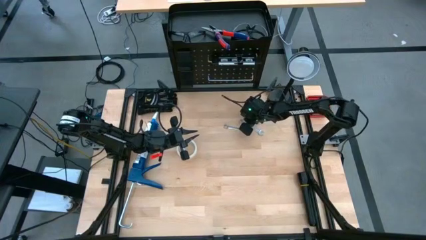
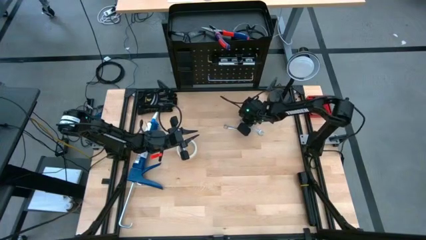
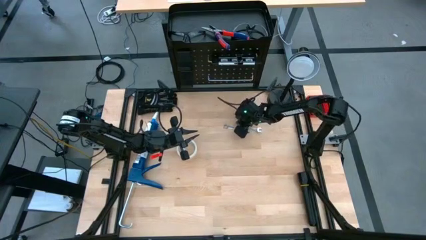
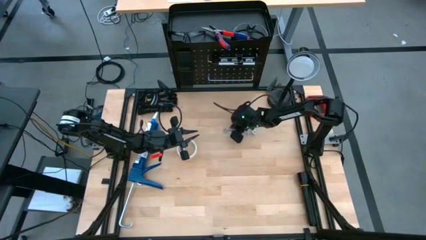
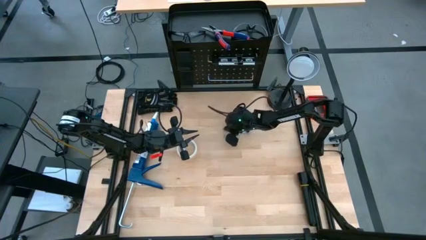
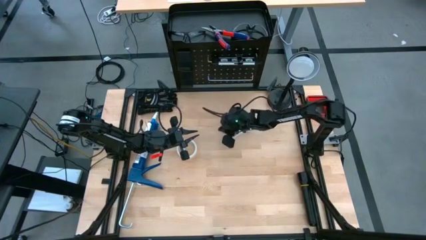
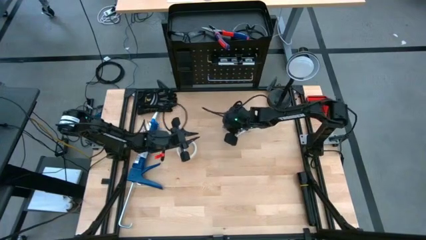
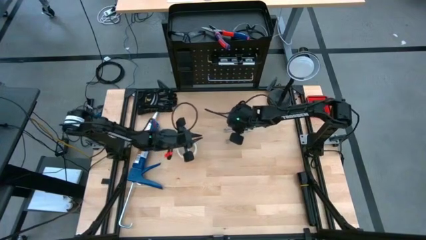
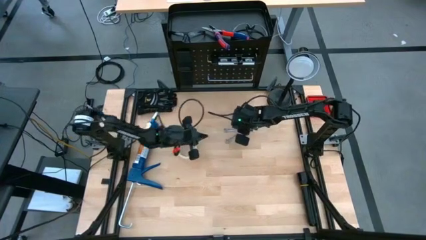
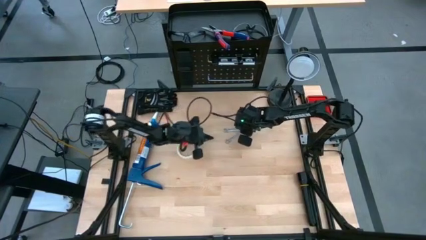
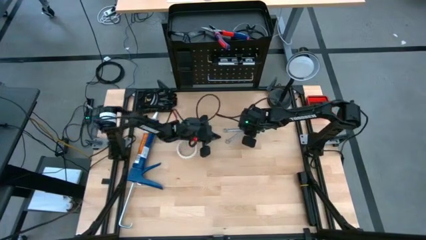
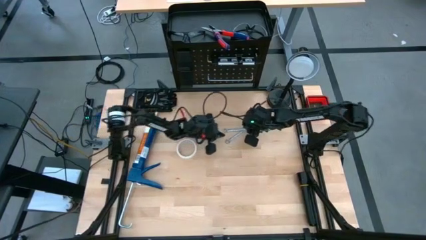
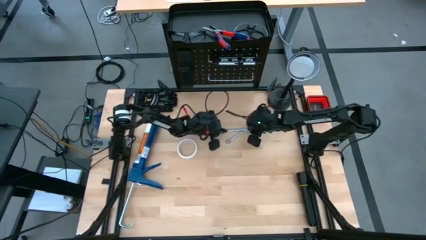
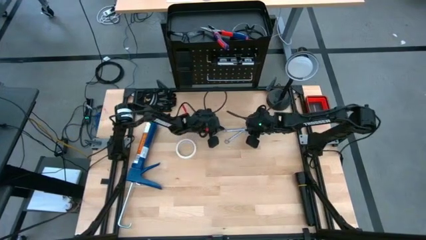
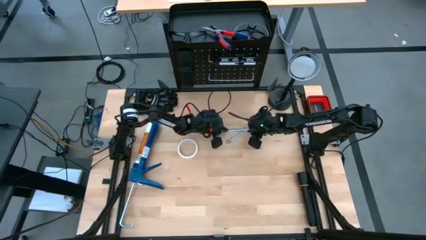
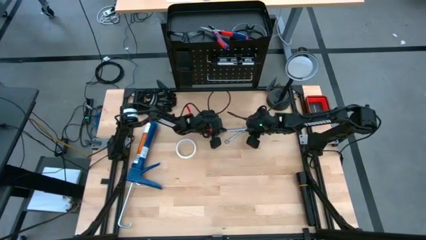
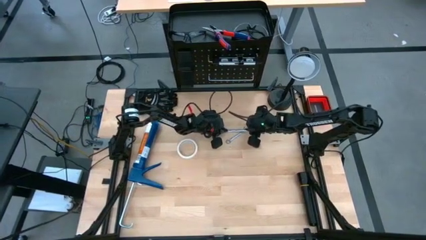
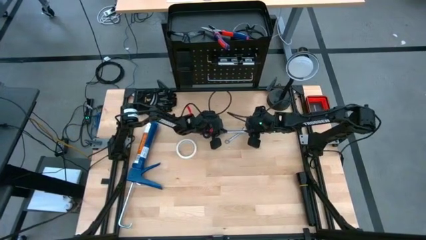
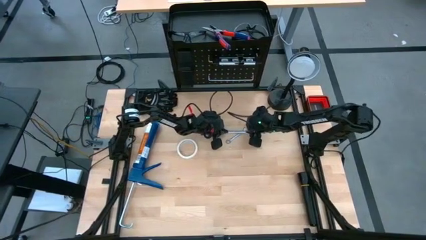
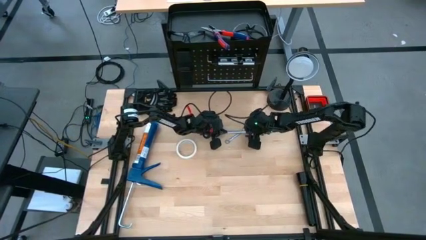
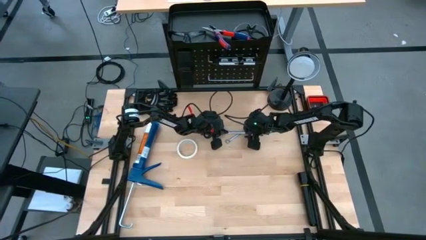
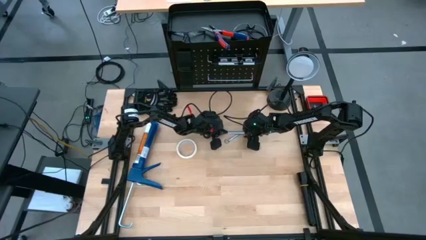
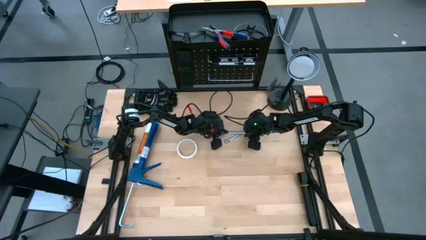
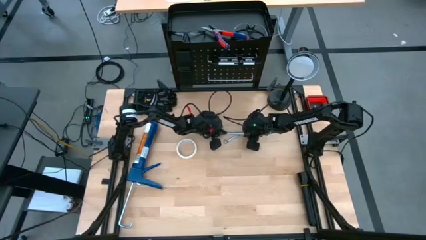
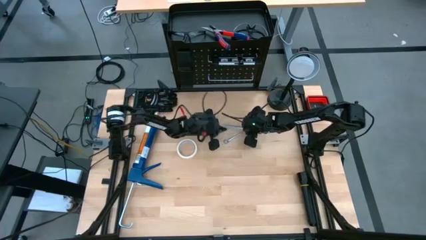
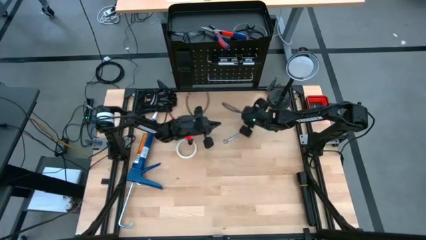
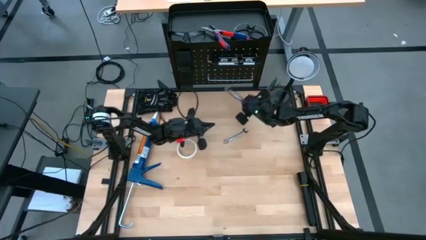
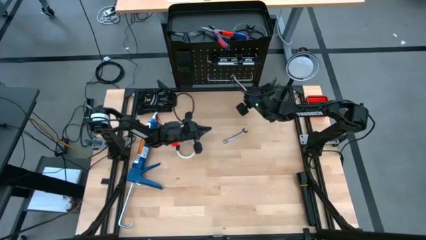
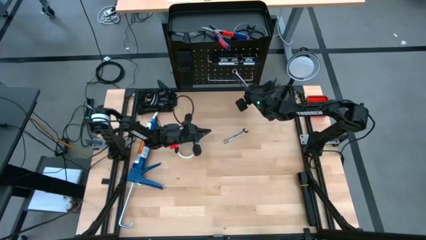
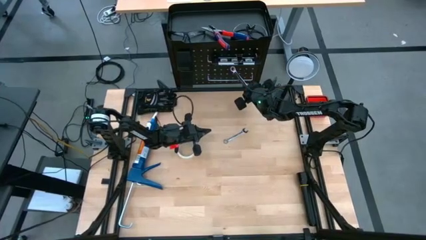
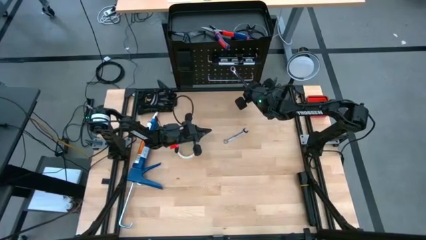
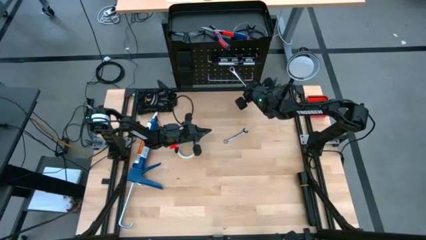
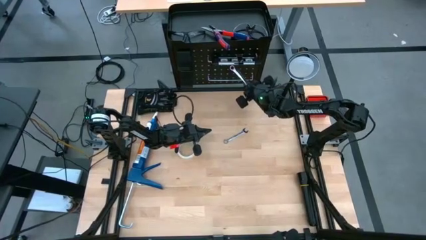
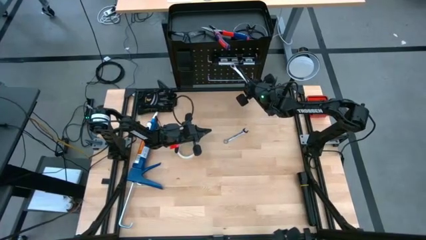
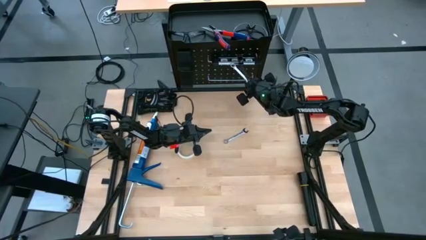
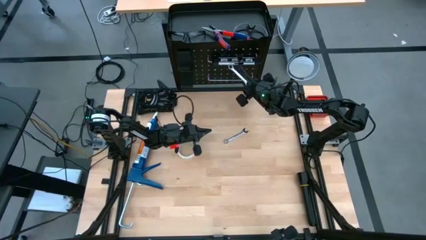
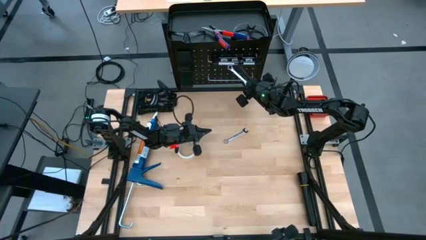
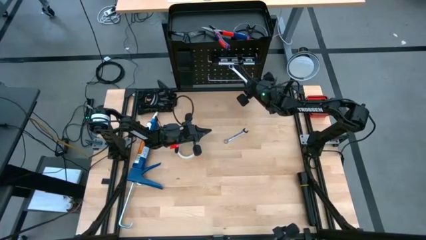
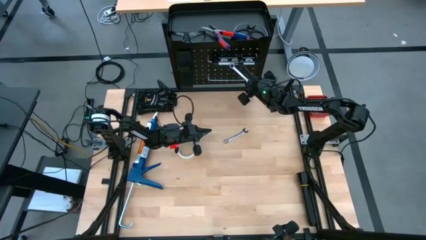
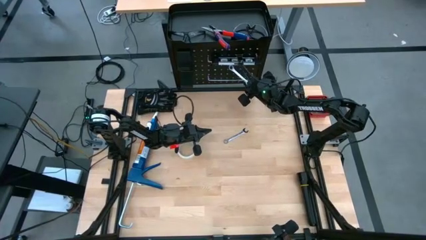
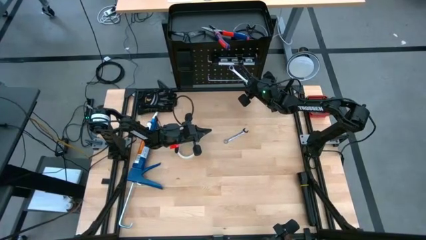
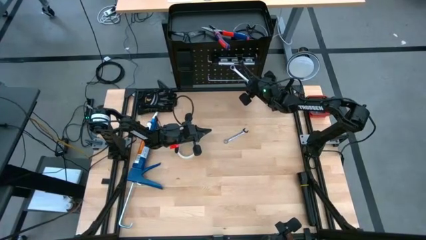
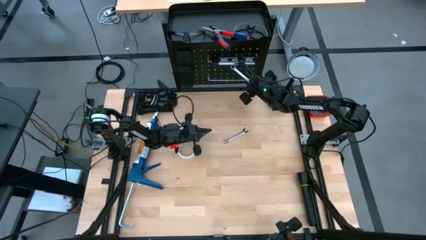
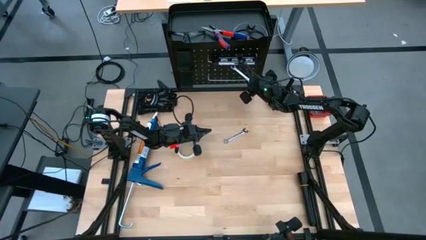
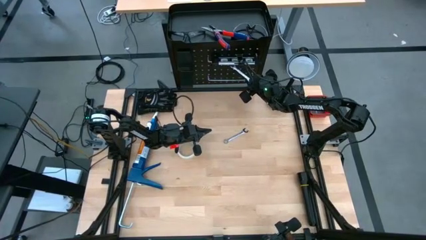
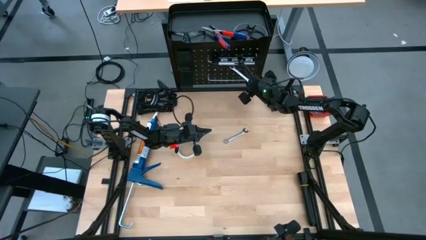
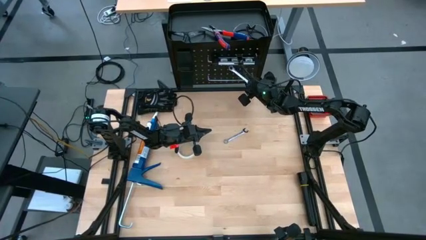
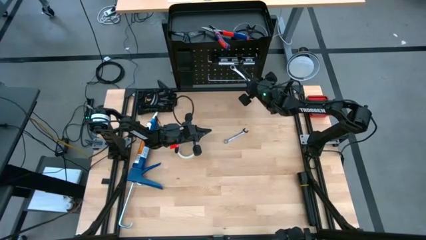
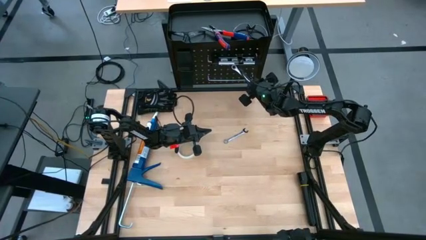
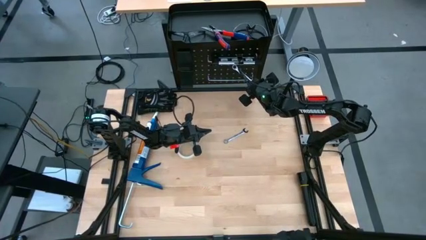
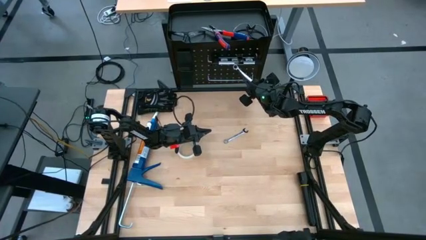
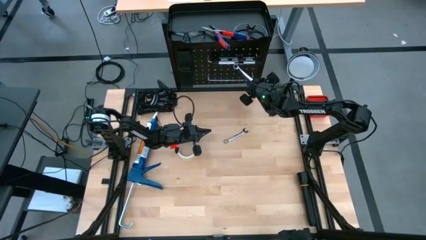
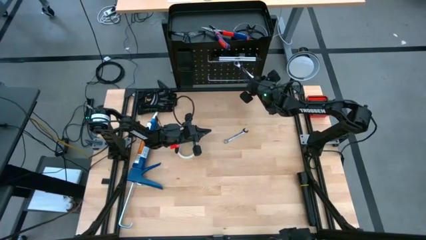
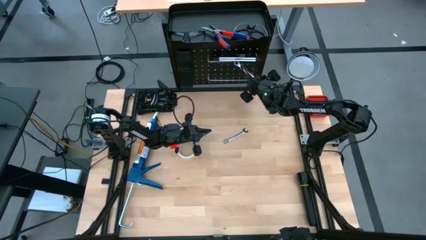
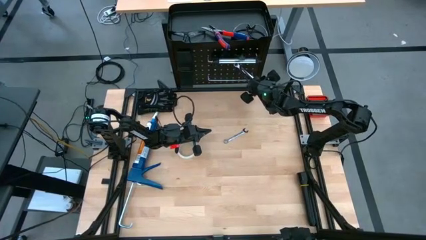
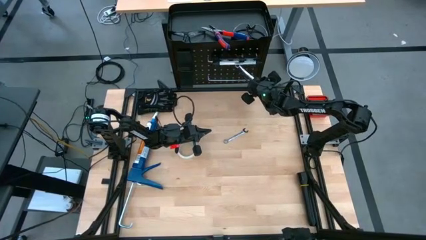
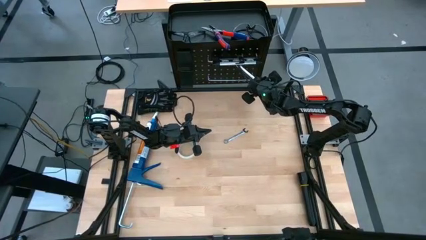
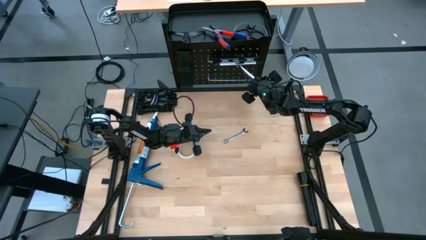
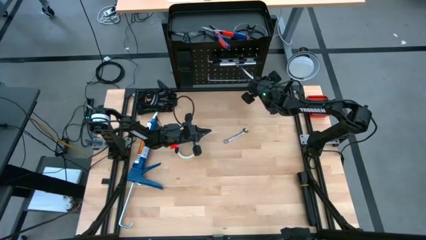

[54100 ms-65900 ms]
Task: Hang tools onto peg board
Hang the right silver wrench on the black peg board

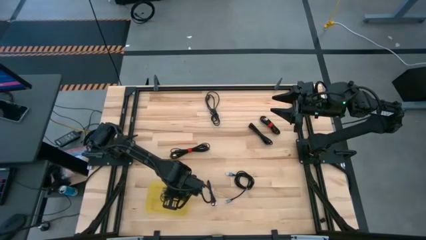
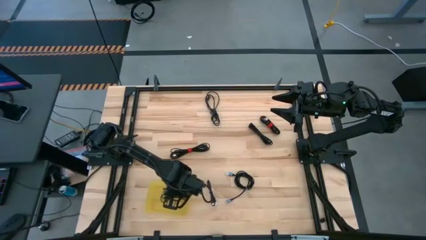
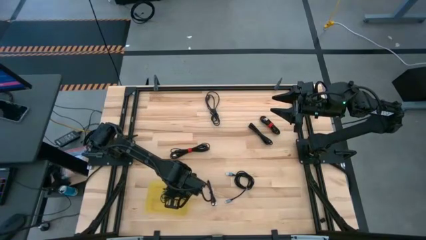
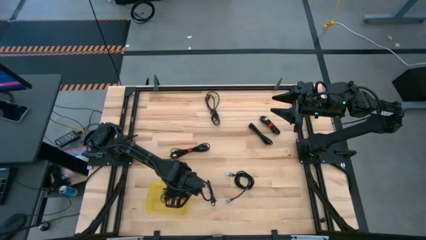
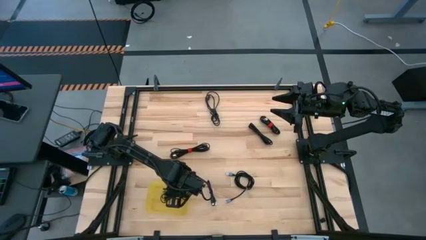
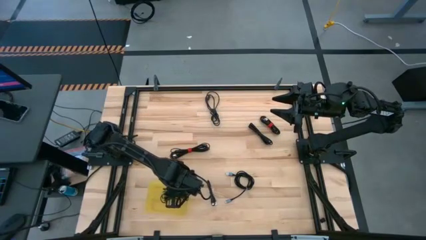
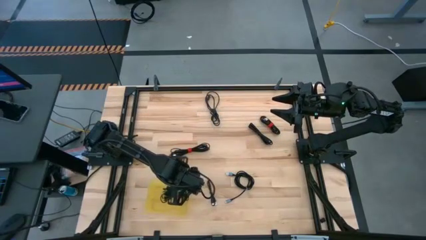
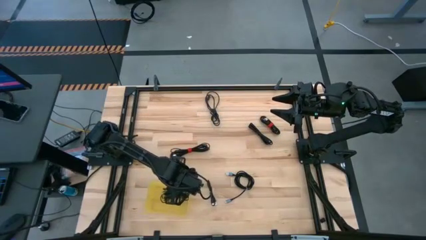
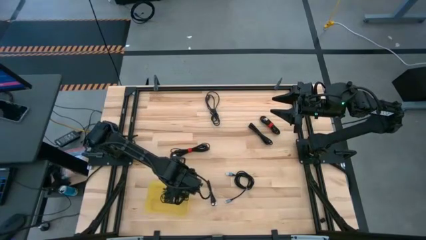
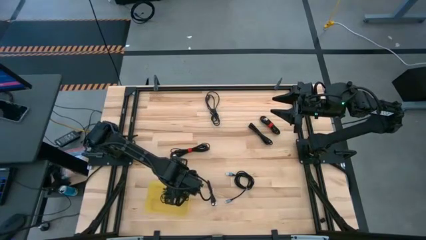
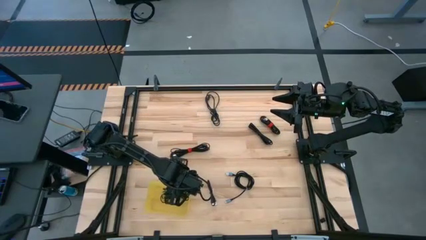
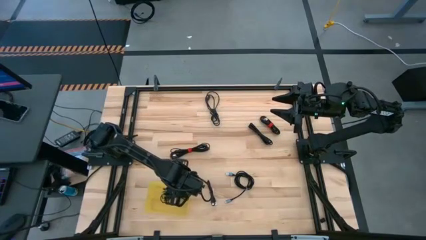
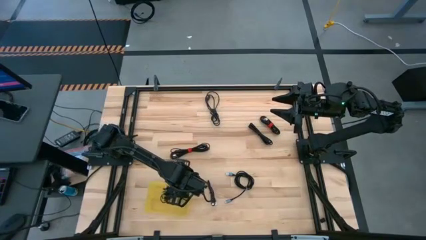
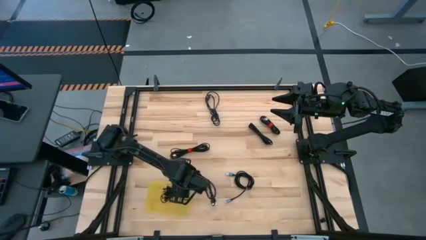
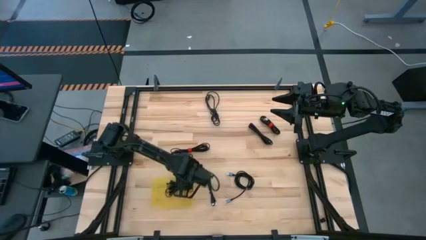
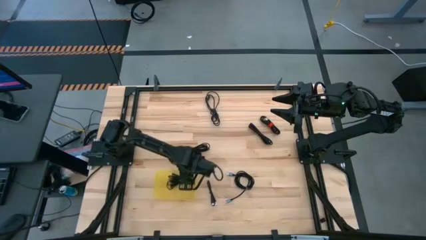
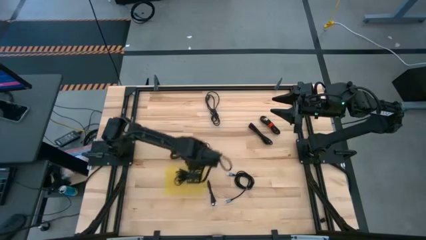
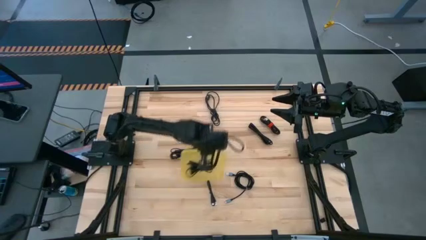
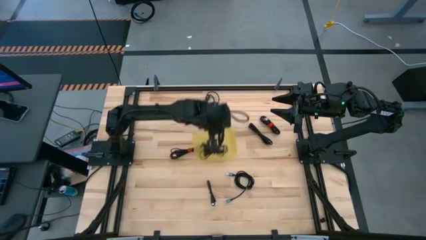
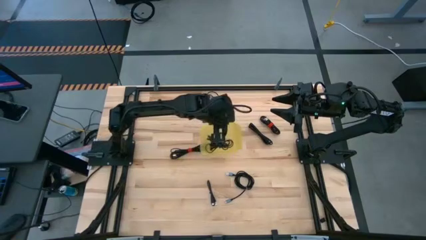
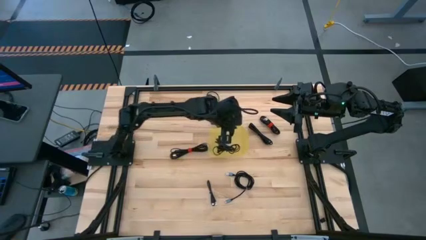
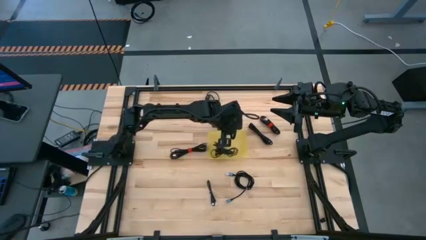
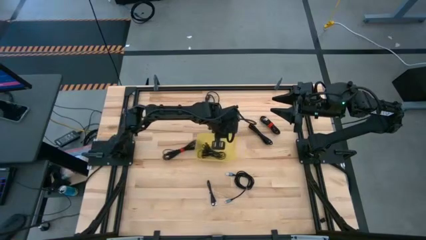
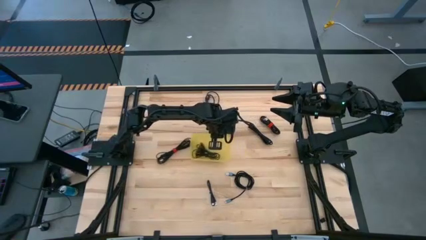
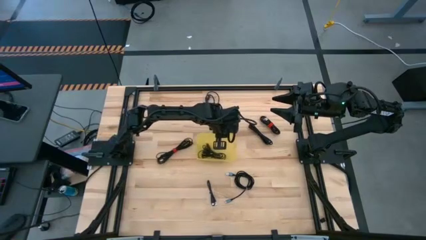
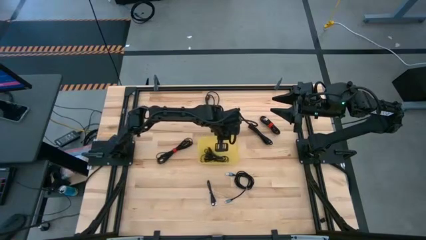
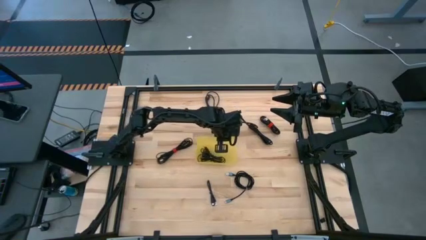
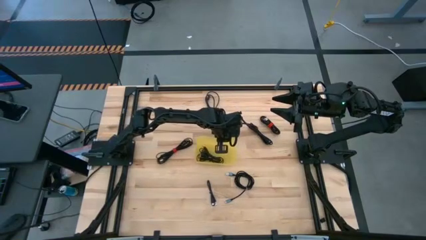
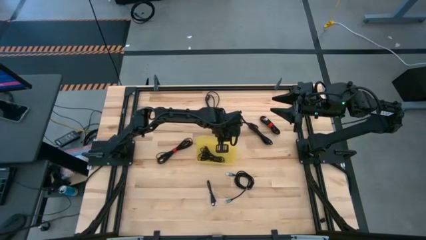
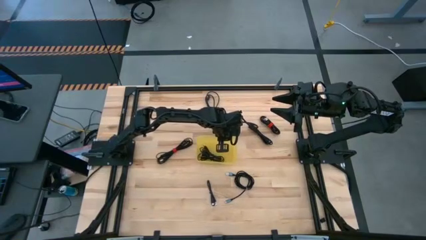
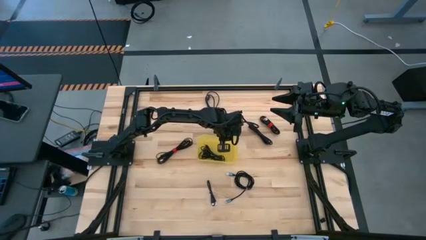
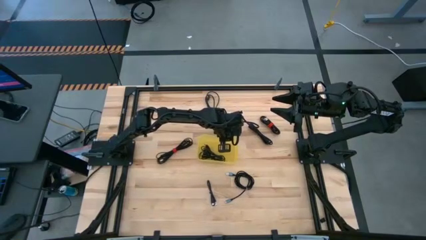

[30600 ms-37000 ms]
Task: Pick and place USB-C Cables
Move the yellow bin to the center of the table
